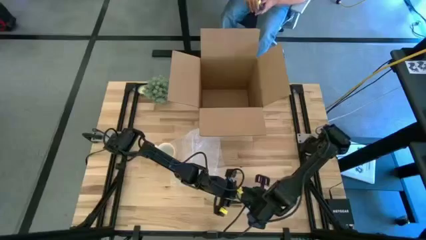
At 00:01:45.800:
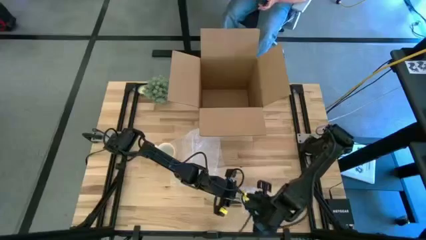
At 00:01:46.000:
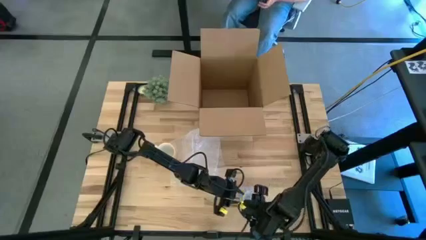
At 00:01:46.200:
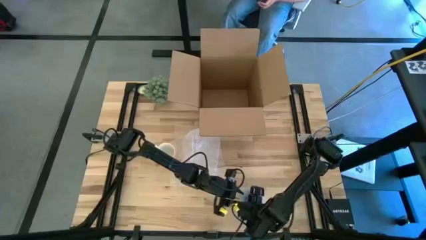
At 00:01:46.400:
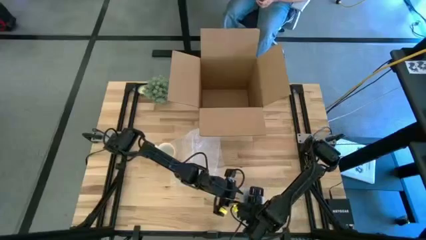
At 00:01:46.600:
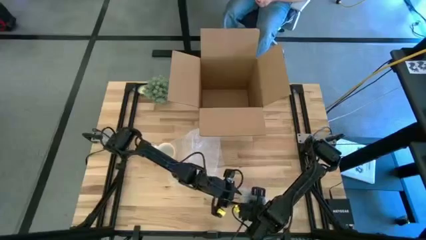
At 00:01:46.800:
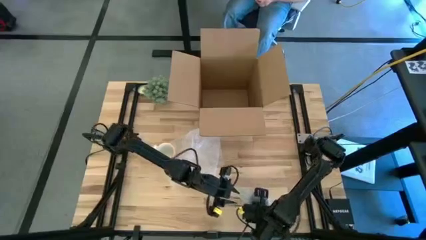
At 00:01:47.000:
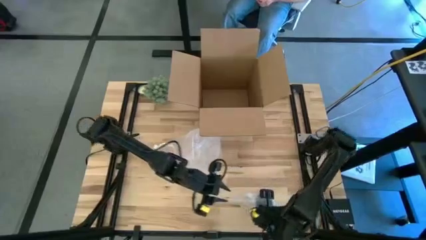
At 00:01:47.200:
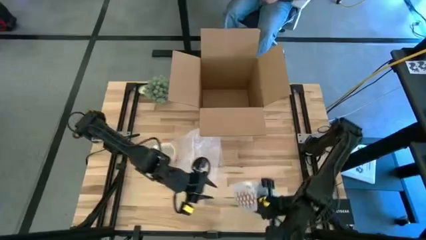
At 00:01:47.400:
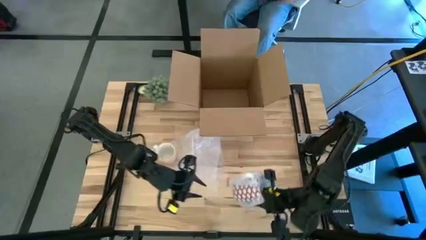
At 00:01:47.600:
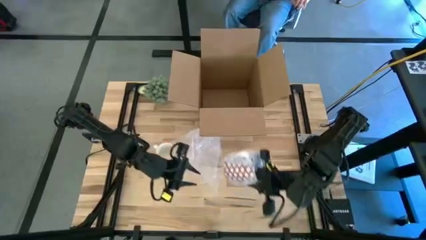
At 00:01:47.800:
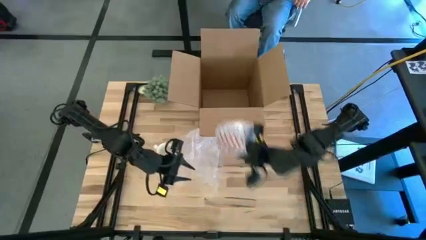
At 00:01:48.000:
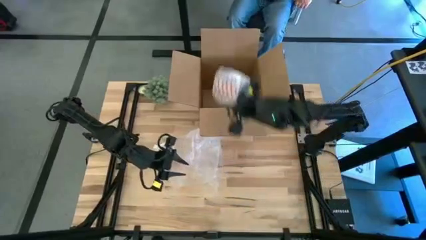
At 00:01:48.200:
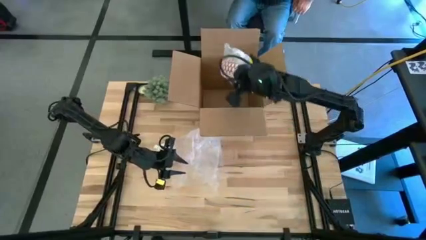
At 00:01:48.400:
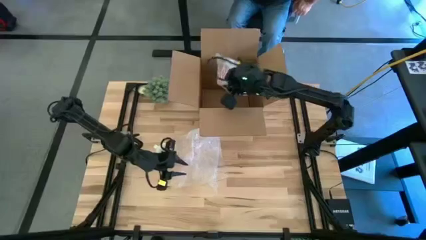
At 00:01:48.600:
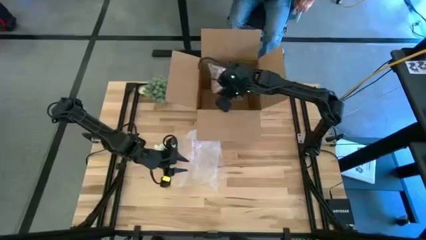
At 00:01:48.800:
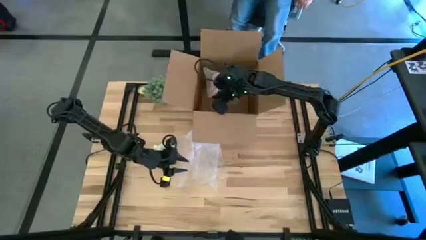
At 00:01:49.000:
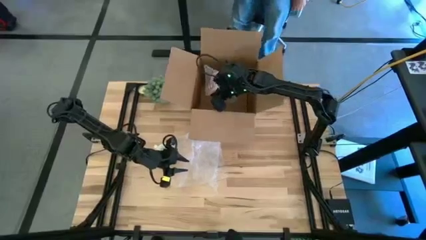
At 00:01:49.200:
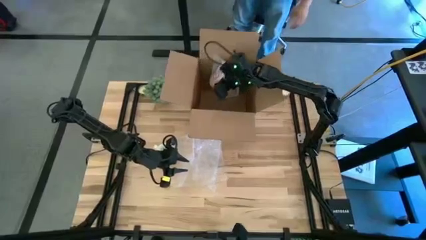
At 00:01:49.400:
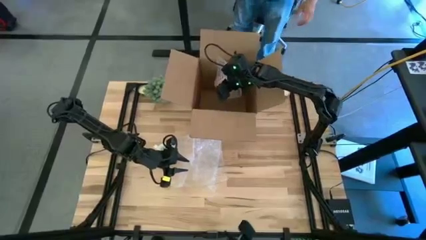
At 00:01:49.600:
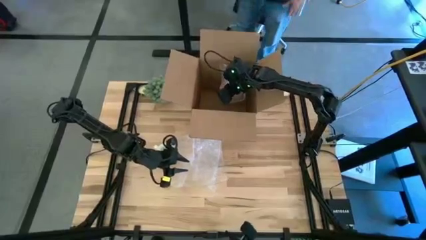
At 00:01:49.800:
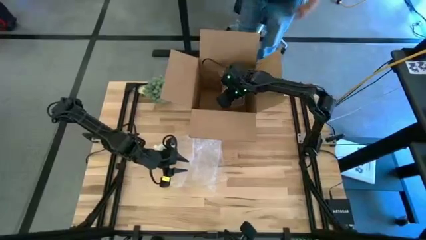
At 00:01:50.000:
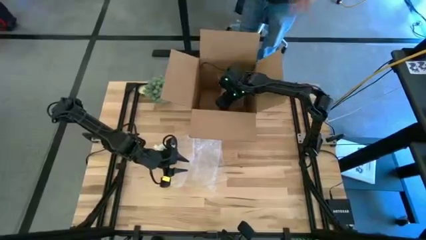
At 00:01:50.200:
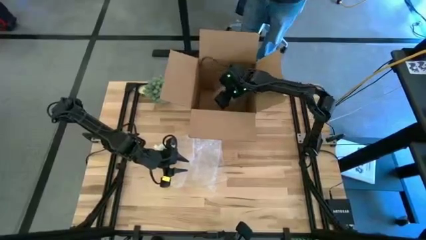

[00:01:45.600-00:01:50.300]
Task: wrap mug
Put the wrapped red mug into the cardboard box

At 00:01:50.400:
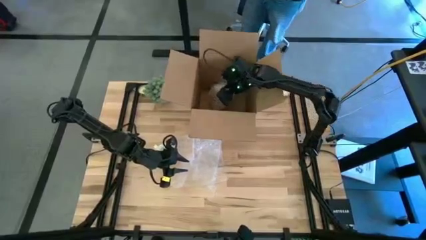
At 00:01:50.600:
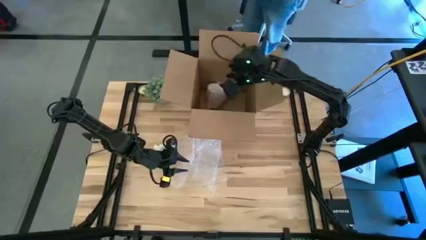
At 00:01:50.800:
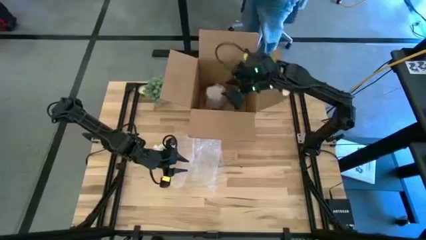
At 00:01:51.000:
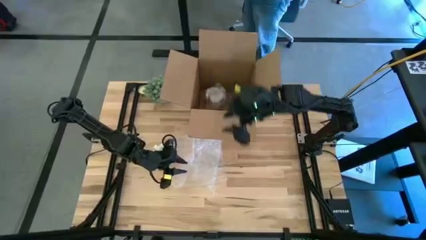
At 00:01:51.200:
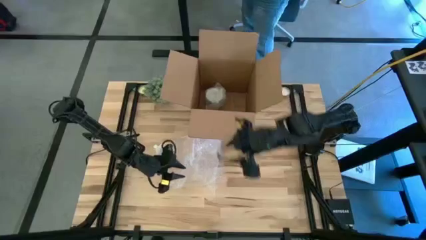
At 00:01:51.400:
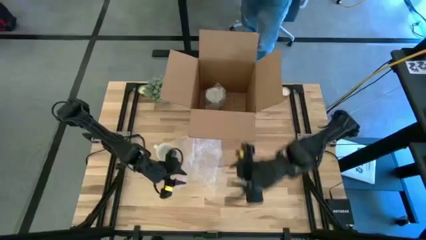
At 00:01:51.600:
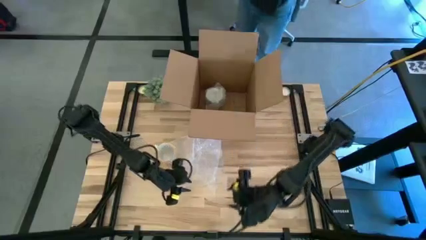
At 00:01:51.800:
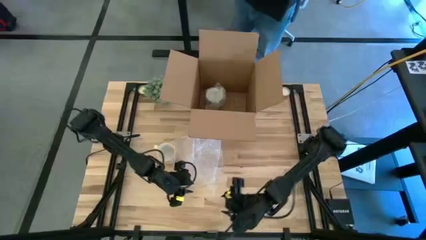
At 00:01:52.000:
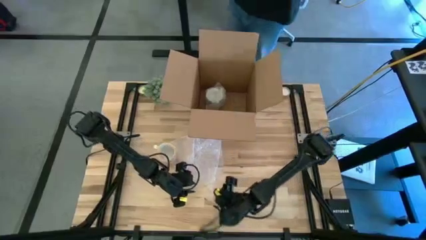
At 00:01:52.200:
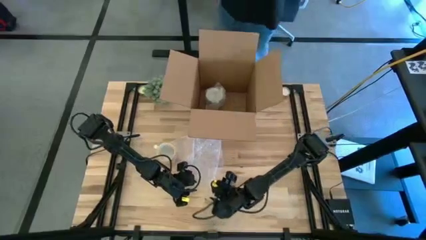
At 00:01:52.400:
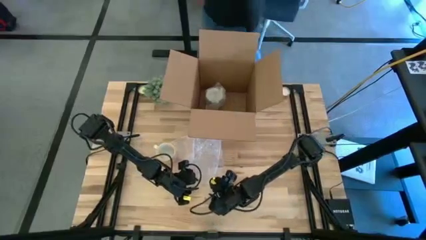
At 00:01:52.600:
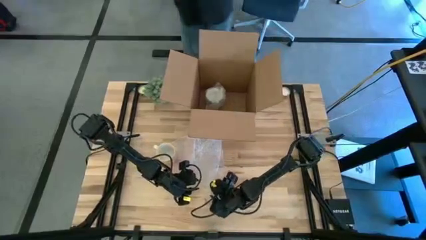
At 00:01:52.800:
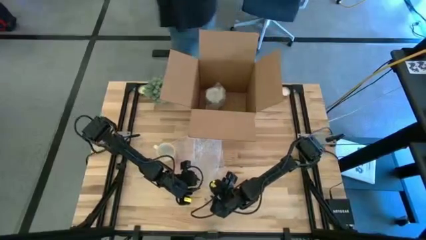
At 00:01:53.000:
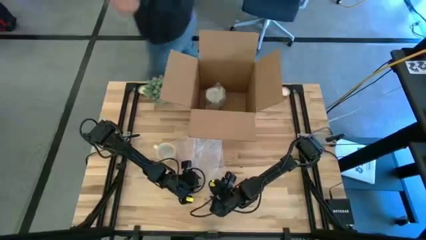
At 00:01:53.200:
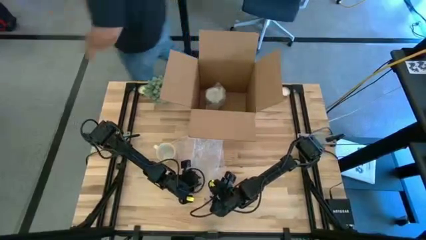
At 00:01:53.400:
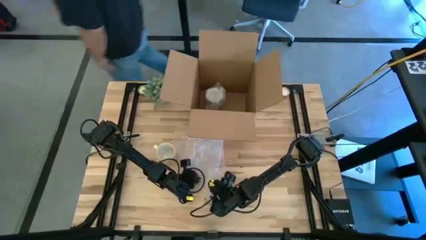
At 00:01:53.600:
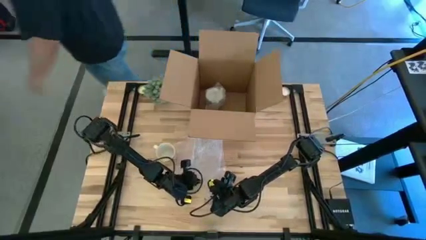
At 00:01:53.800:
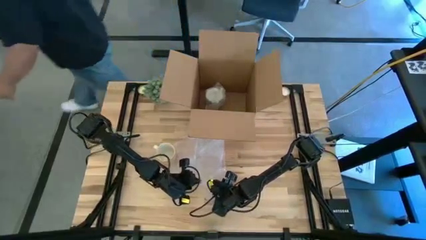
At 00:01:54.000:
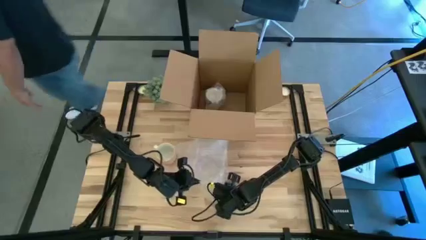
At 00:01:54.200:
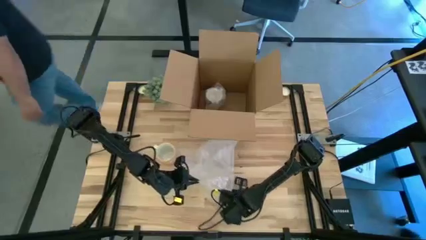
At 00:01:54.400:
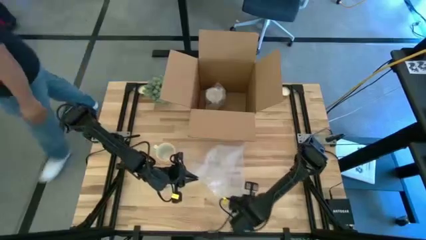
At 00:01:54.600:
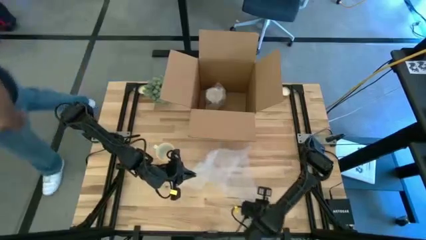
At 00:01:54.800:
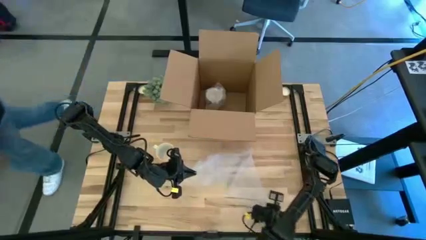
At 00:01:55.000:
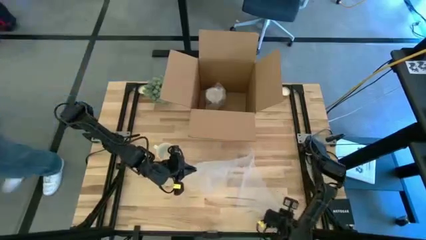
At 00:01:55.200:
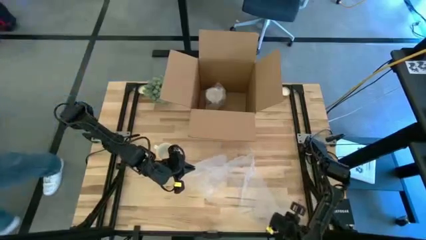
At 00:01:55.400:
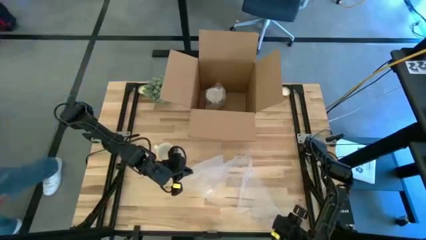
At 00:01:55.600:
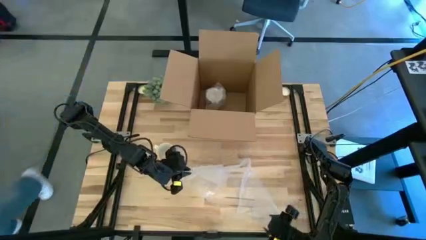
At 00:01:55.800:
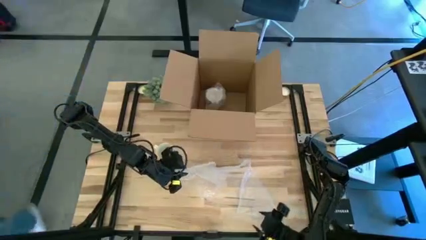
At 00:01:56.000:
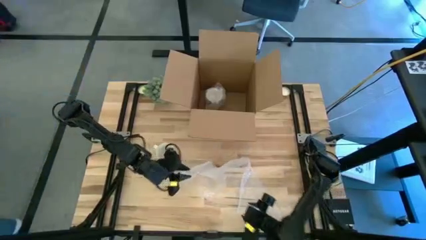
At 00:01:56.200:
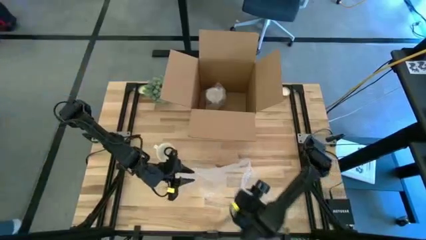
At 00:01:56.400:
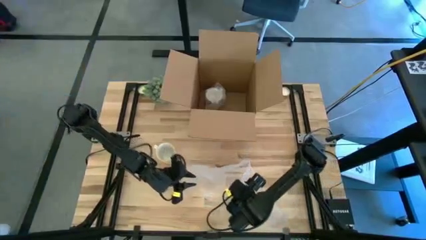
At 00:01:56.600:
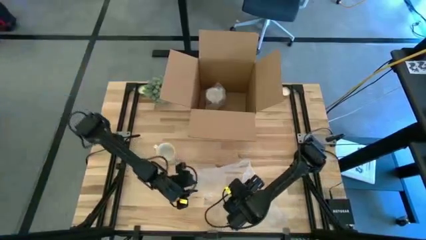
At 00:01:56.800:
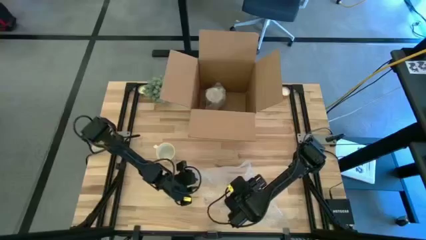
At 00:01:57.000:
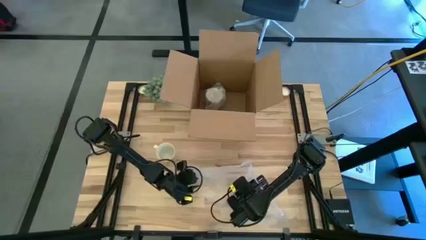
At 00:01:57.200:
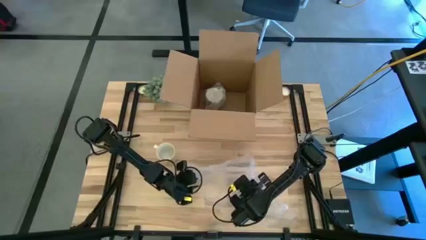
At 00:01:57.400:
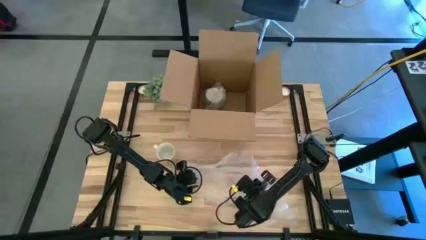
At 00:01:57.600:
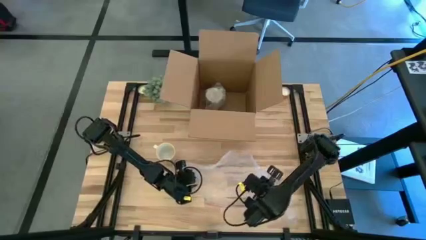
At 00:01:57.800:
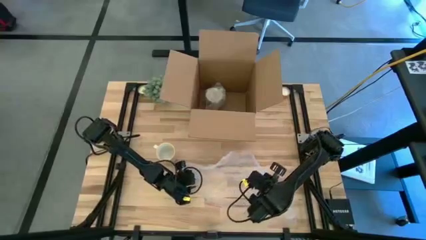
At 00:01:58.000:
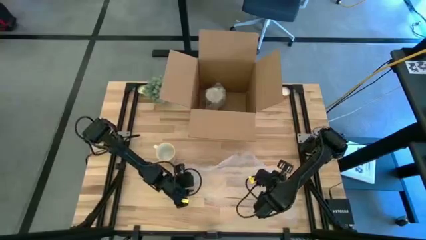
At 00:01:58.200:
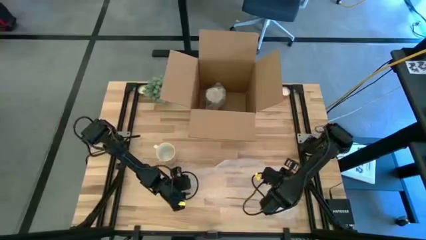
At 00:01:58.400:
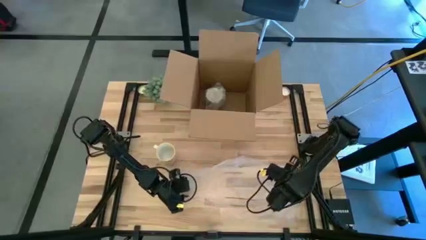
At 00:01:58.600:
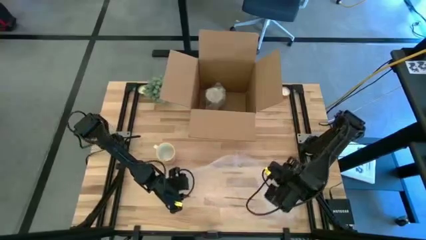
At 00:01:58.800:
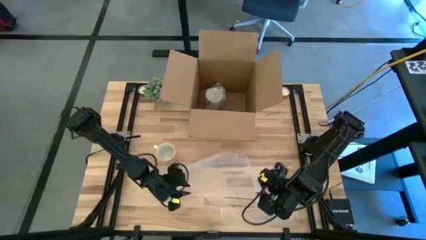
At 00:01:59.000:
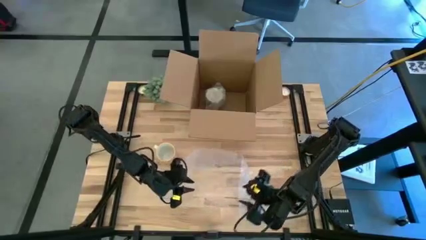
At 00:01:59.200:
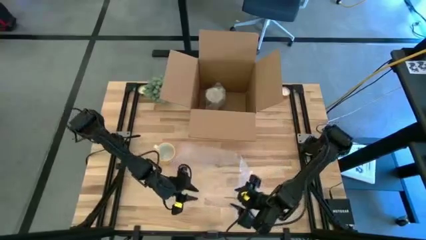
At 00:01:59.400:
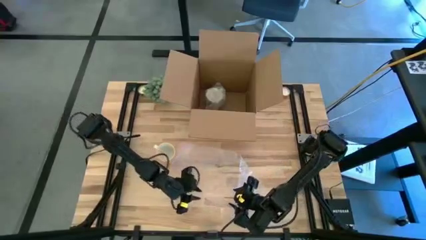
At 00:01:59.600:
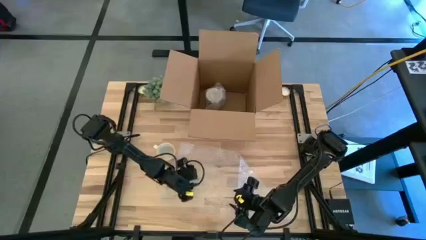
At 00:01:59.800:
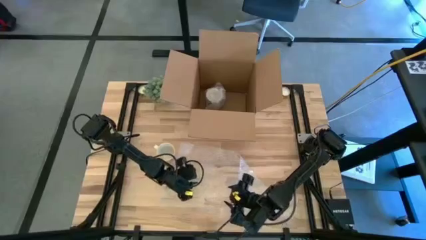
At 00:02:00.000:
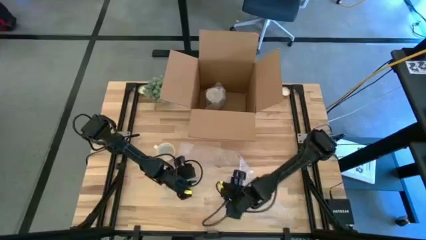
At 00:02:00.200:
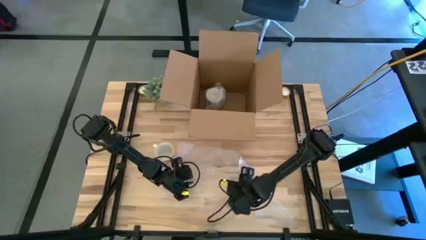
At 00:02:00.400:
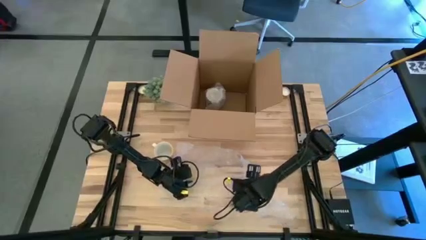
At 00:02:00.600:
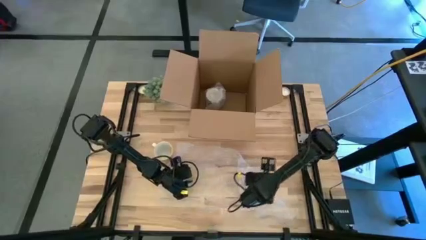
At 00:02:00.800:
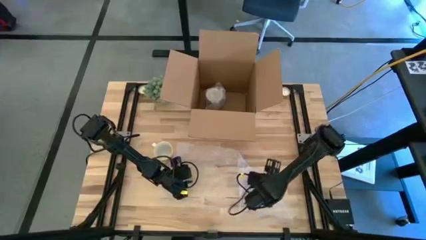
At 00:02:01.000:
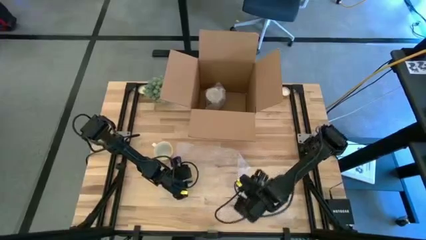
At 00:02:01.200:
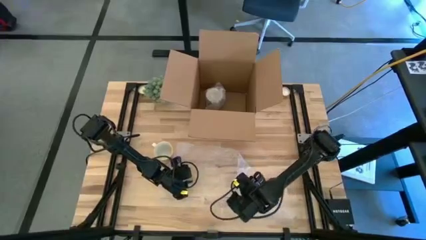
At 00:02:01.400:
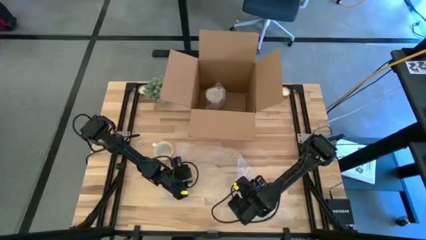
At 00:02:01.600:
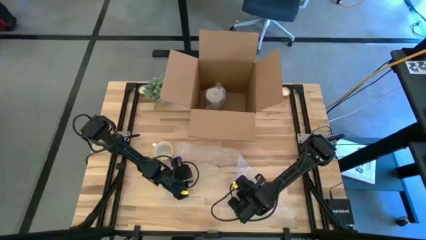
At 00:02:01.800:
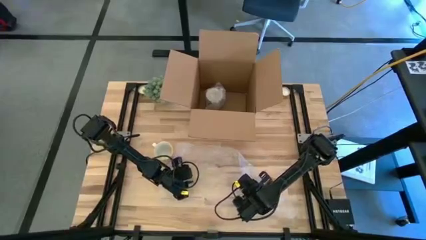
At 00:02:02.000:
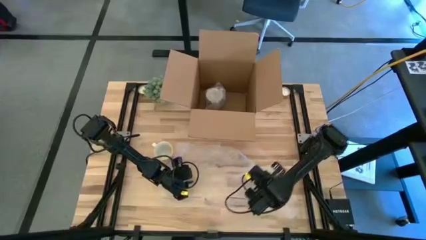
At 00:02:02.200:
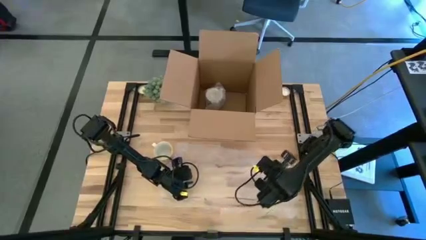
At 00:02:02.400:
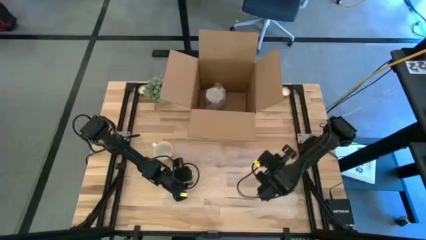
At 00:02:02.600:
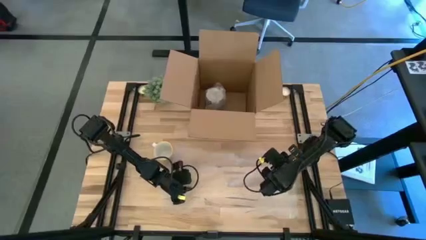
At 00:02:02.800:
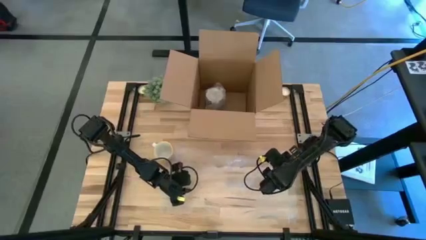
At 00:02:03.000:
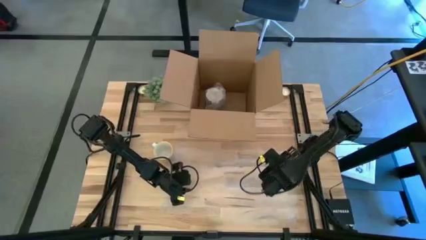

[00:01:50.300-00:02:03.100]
Prepare the bubble wrap on the table

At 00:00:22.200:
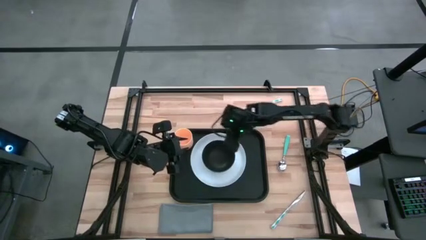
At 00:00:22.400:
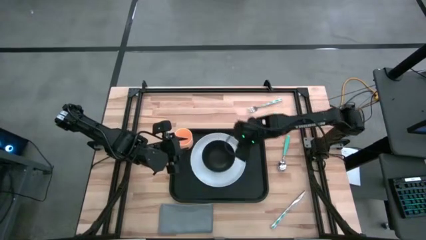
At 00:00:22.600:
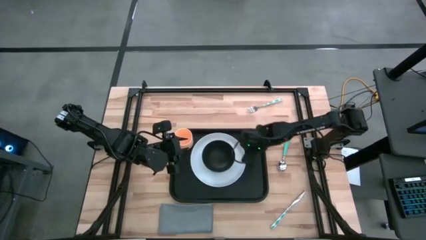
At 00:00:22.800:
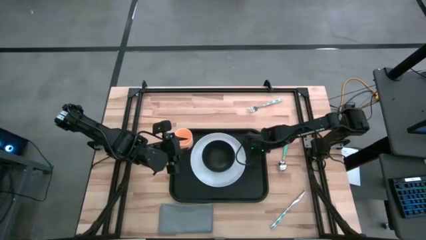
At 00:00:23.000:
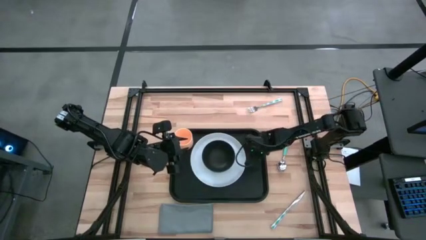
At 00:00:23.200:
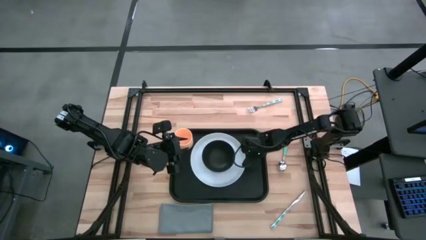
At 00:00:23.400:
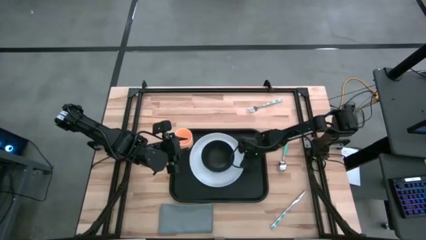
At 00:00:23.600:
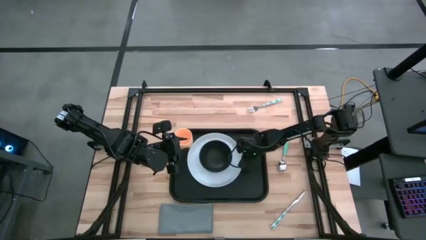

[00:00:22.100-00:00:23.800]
Task: Set up tray
Adjust the white plate in the center of the black serving tray
